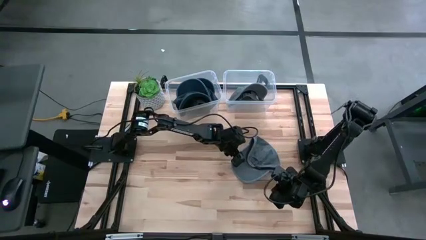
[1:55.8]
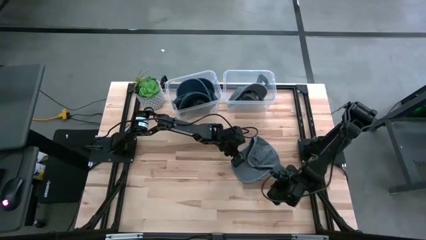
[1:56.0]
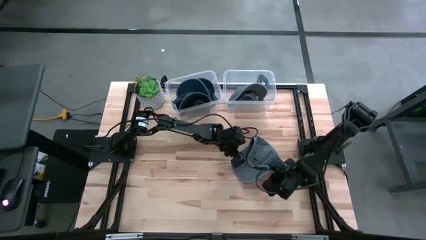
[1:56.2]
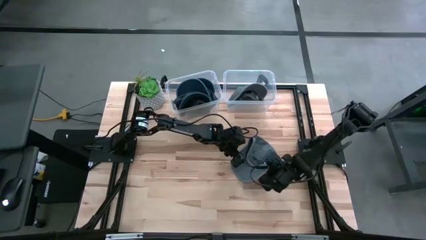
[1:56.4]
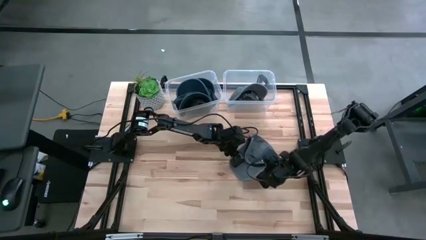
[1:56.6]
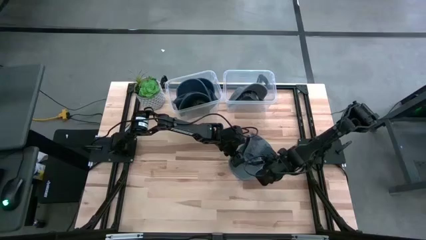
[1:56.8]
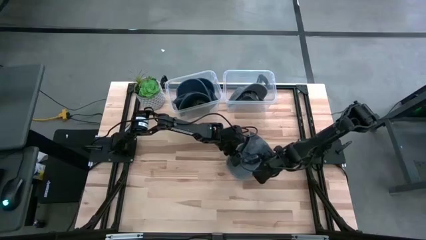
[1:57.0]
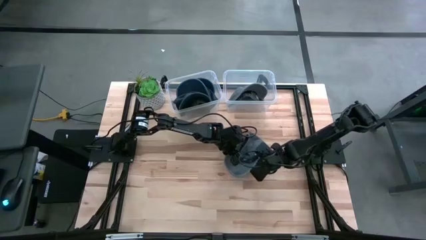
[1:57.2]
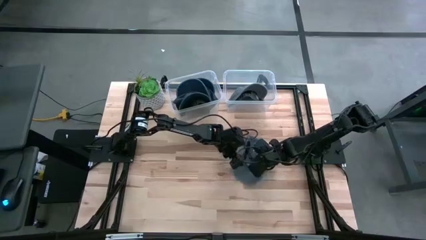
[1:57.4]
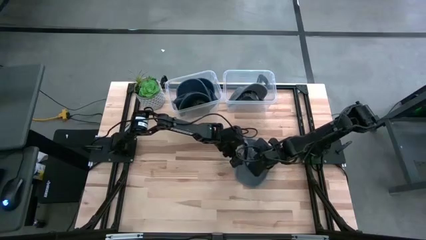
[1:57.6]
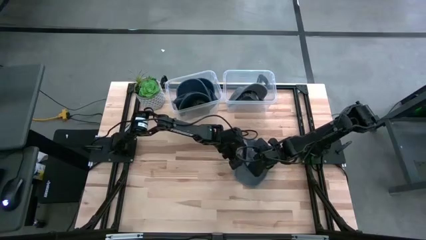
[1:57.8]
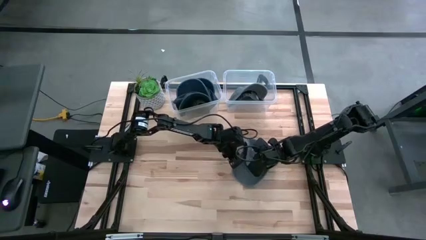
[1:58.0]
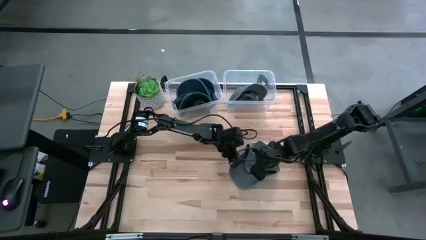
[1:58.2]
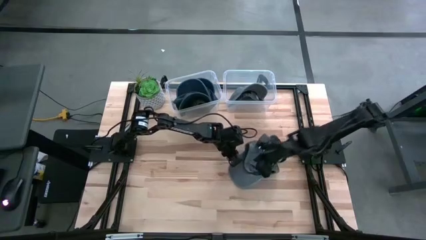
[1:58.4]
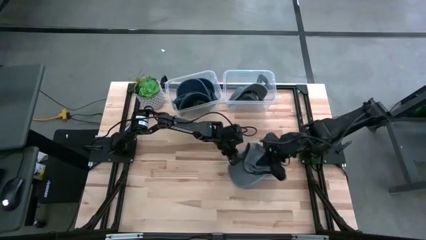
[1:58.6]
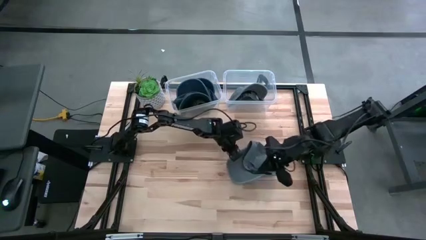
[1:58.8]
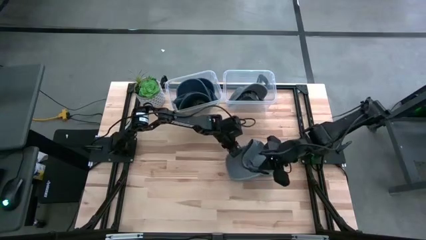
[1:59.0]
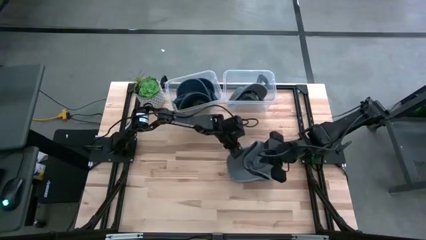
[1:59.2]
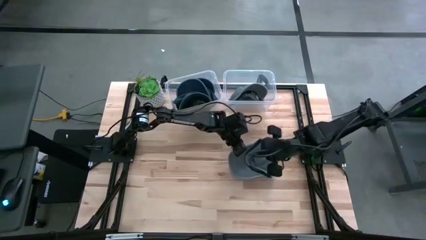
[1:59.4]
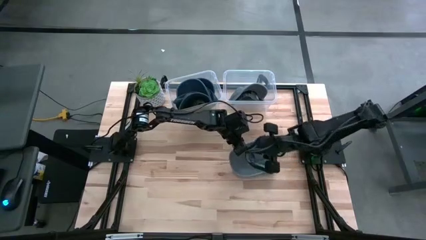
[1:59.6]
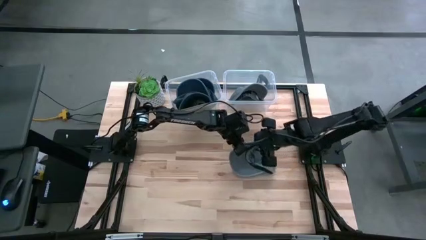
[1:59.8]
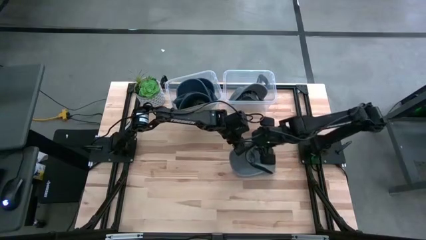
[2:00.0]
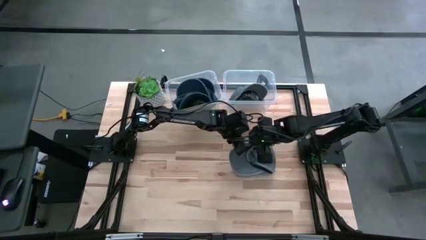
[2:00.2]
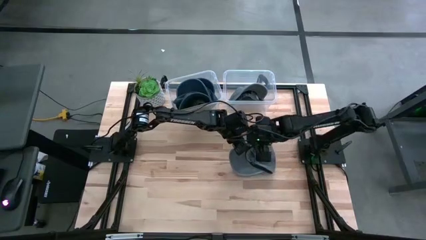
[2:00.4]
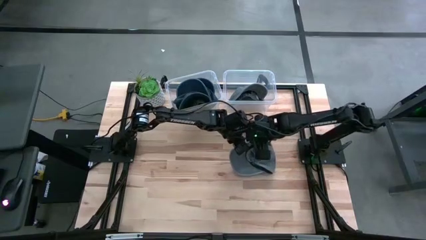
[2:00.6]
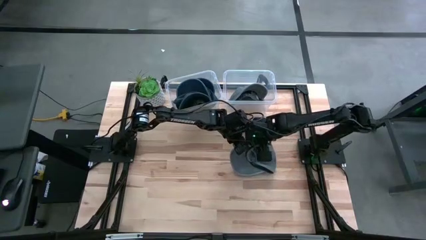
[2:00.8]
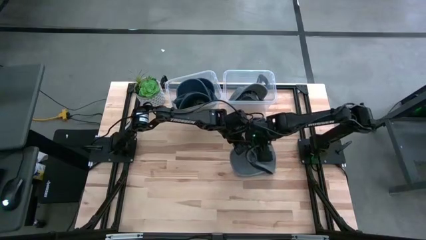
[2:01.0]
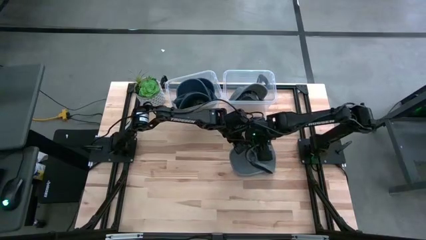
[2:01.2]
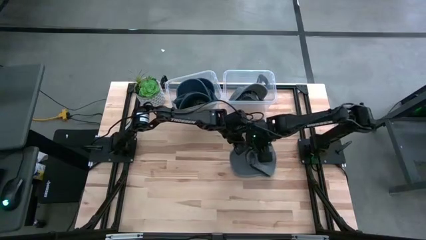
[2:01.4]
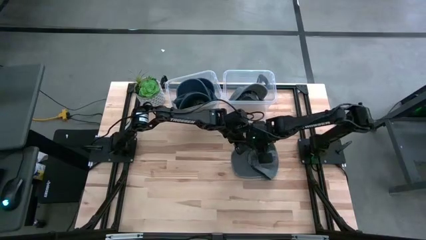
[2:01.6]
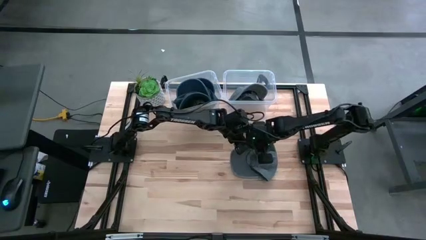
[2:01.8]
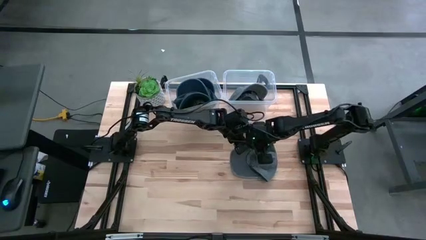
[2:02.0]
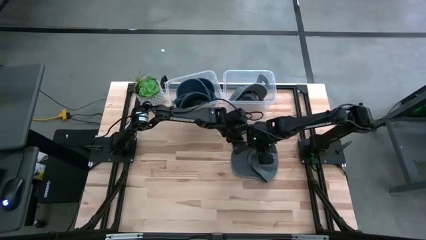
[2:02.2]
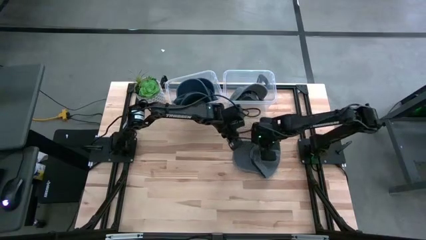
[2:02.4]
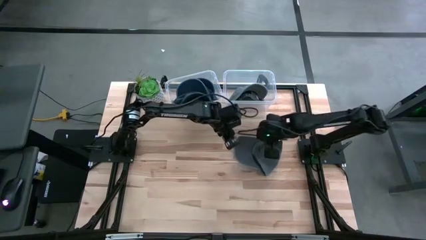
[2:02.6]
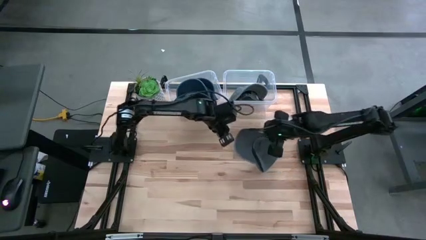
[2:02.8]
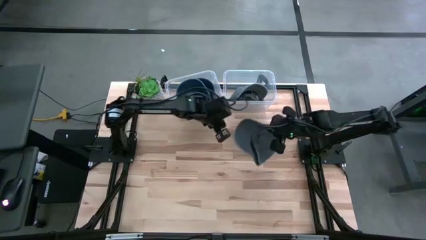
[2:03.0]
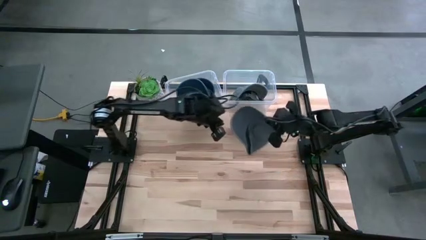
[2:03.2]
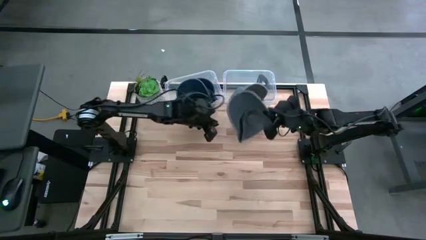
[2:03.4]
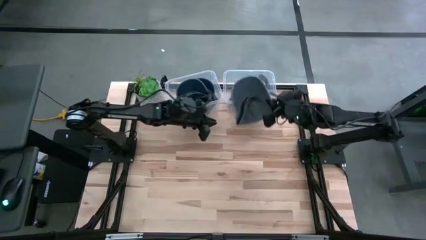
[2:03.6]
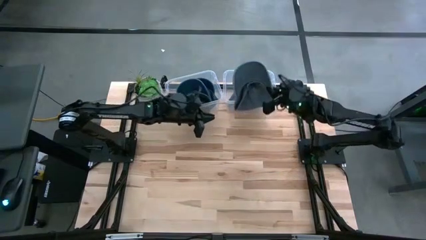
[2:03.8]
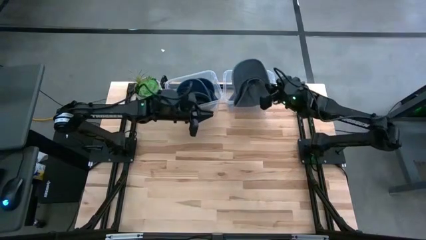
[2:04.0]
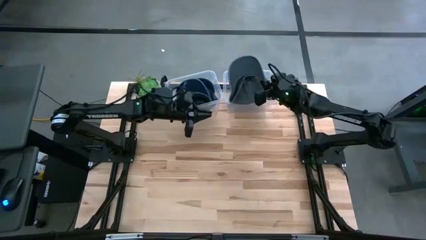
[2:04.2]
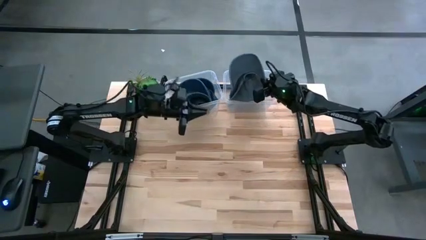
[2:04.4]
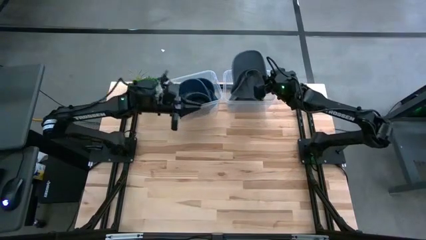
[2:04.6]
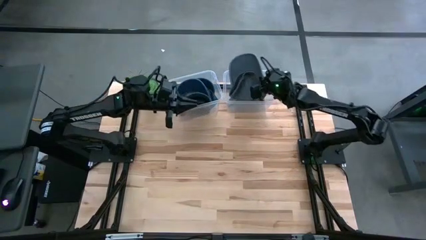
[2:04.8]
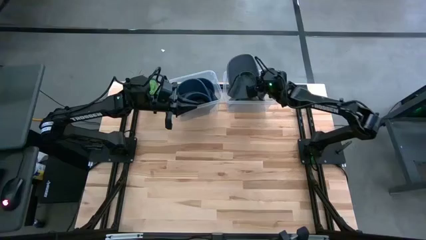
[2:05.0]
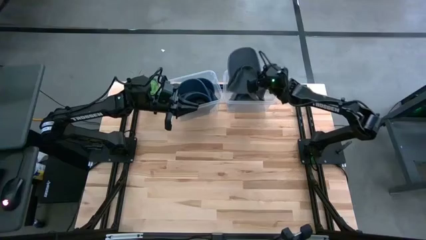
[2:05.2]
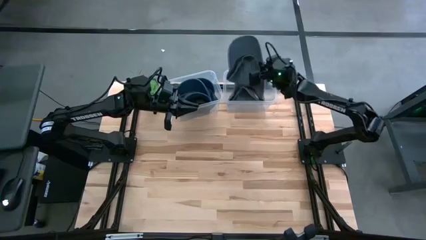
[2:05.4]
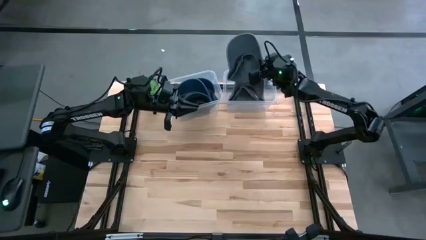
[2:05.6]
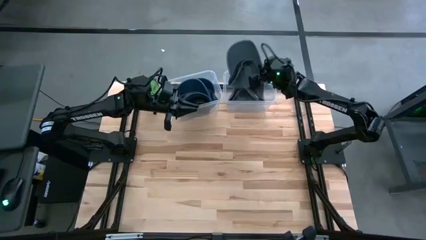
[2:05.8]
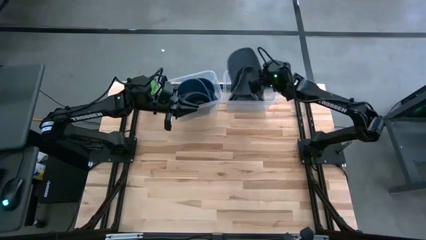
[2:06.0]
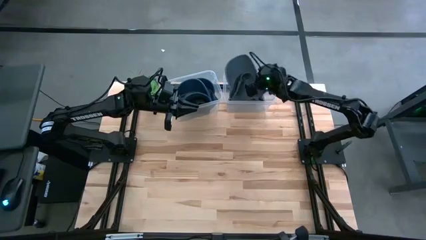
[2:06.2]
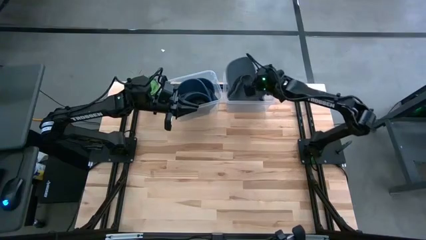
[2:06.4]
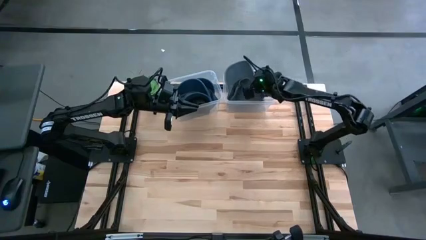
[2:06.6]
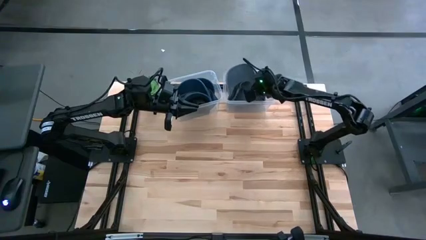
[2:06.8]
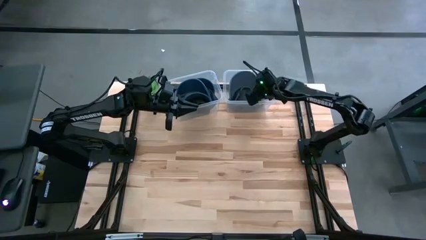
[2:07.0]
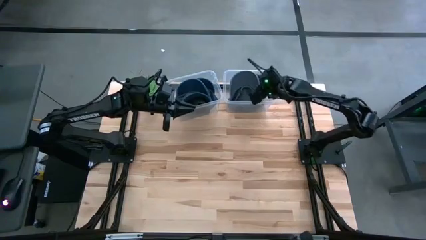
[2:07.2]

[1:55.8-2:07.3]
Task: Pick & Place hat
Put the gray cap into the right transparent bin

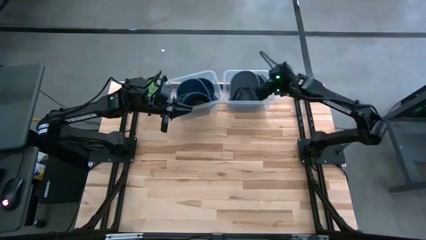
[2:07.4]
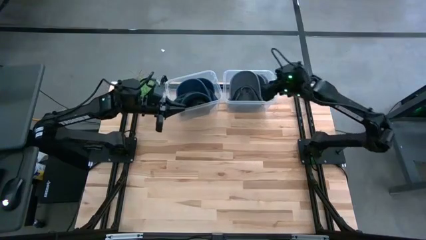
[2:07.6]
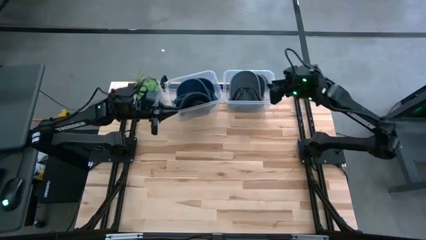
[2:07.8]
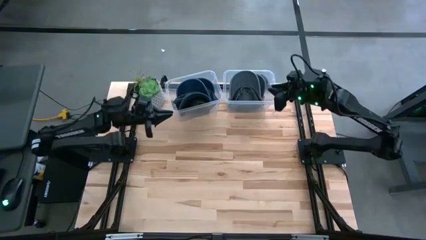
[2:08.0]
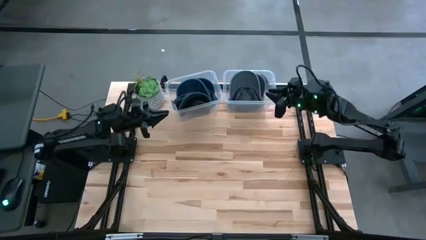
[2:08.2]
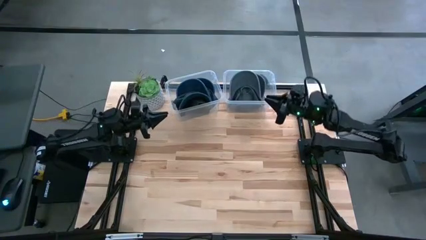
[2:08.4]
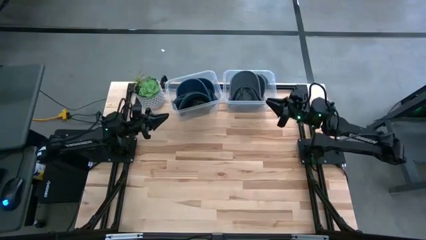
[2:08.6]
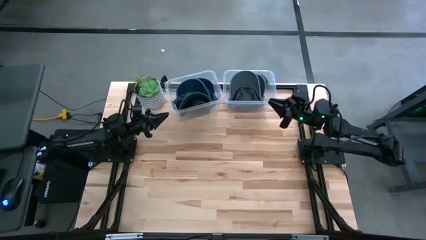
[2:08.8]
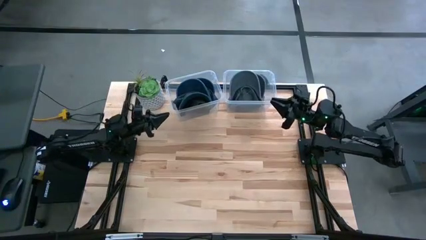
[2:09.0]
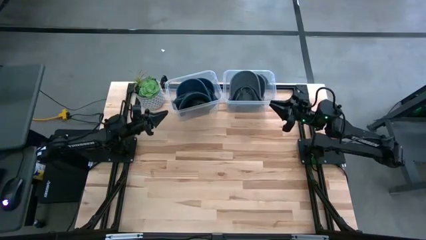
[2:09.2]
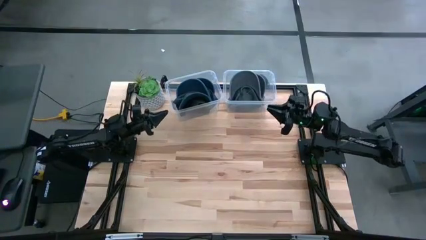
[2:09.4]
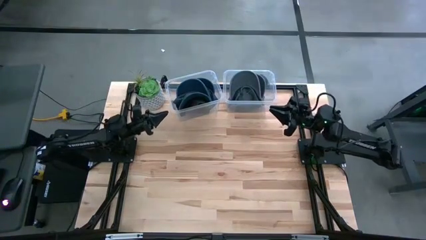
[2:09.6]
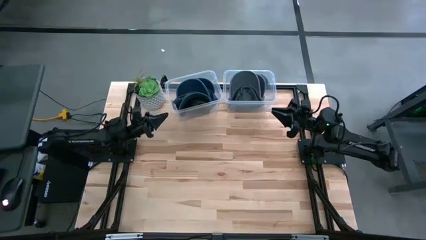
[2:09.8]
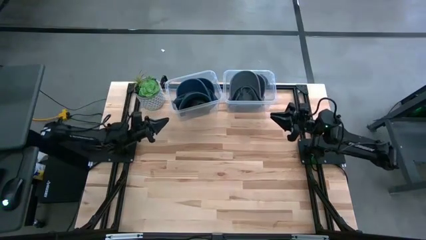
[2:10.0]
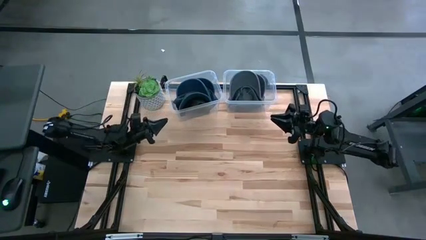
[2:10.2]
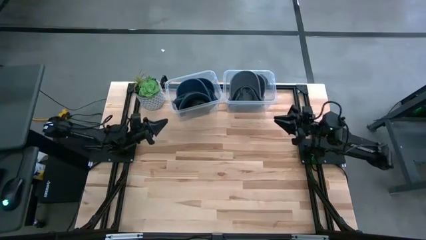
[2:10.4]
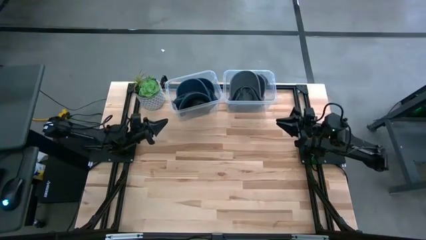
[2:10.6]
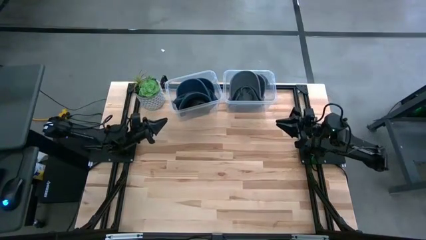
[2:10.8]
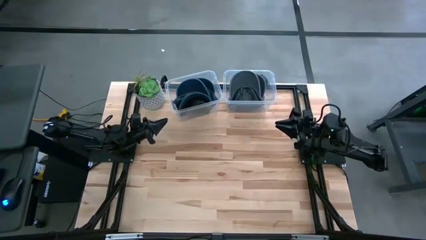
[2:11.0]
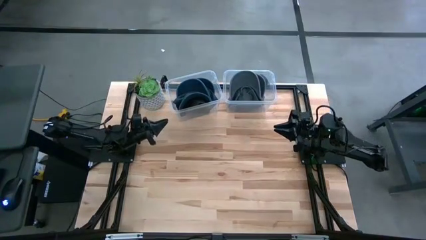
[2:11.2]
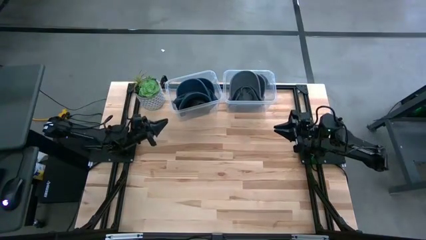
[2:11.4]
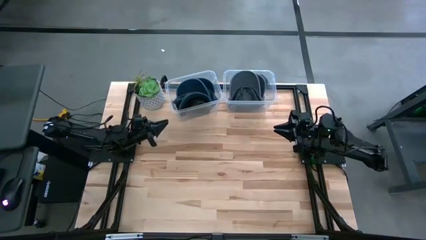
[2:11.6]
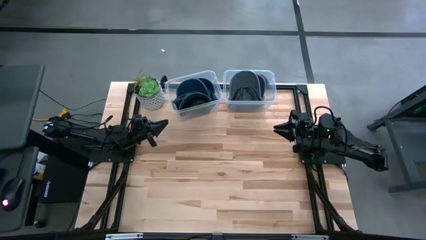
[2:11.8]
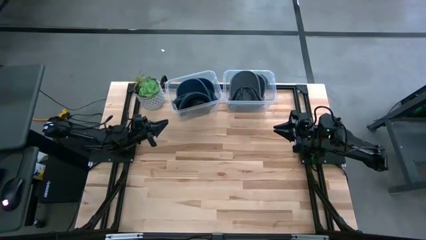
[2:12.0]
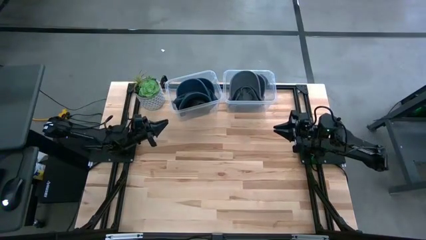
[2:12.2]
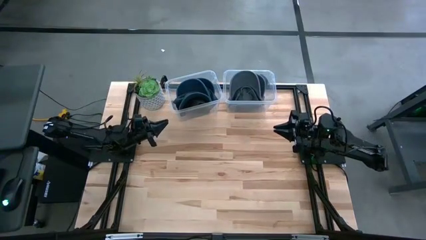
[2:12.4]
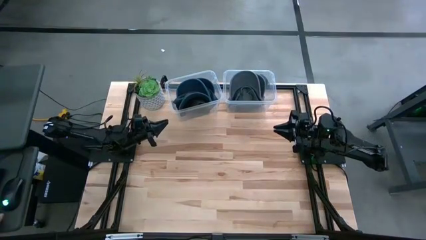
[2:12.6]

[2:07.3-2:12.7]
Return to Home Position
